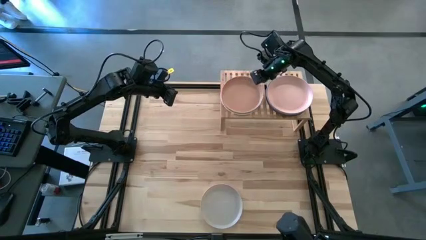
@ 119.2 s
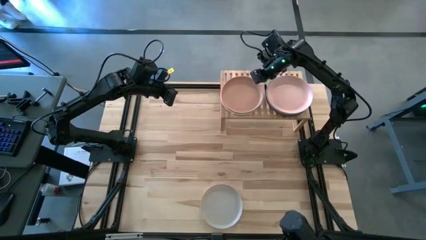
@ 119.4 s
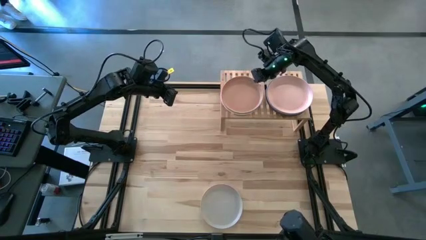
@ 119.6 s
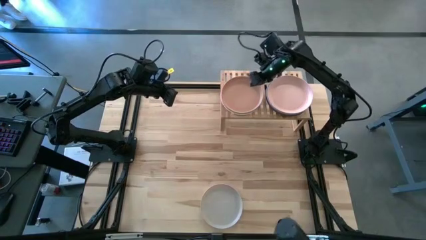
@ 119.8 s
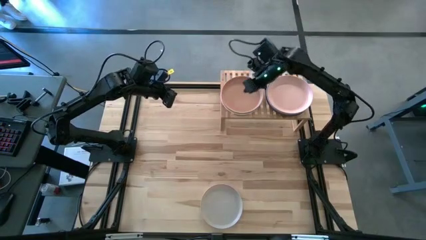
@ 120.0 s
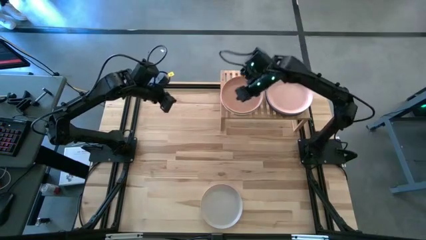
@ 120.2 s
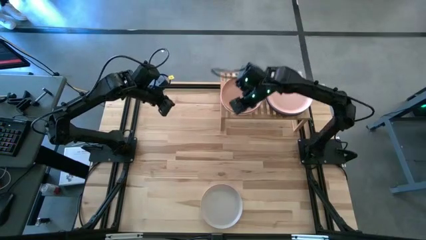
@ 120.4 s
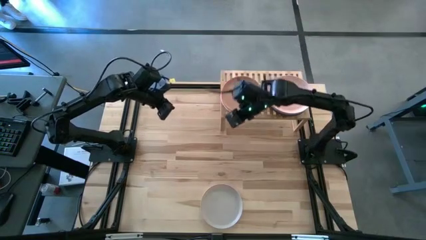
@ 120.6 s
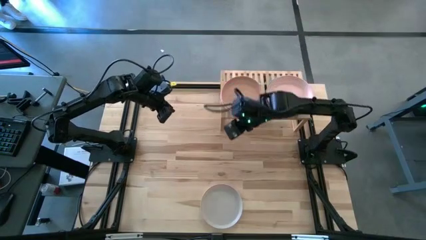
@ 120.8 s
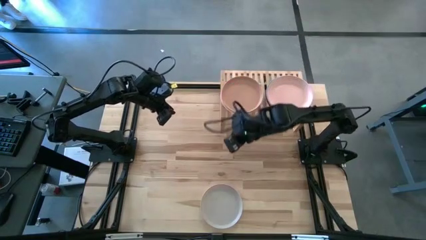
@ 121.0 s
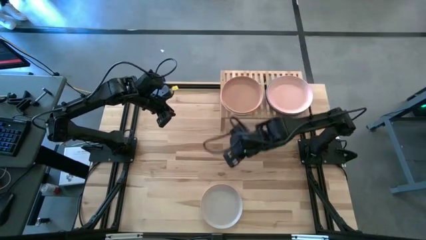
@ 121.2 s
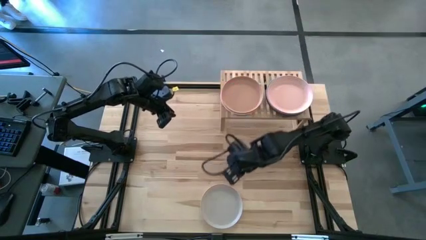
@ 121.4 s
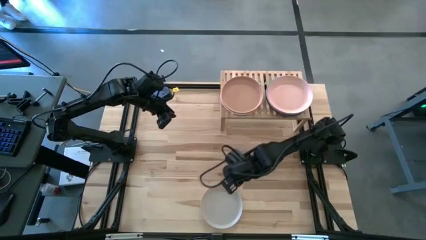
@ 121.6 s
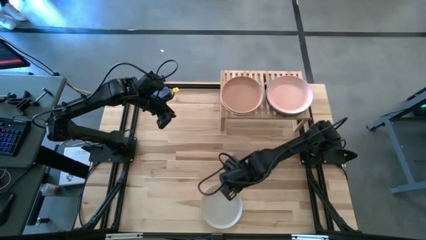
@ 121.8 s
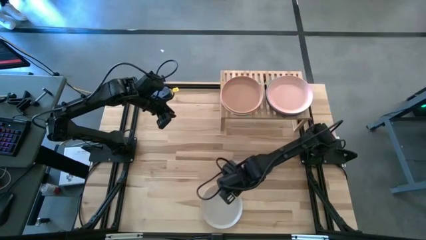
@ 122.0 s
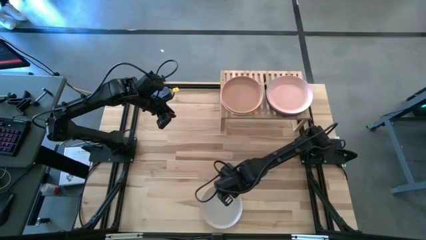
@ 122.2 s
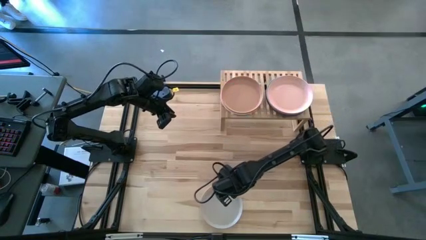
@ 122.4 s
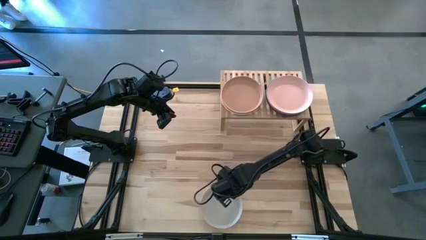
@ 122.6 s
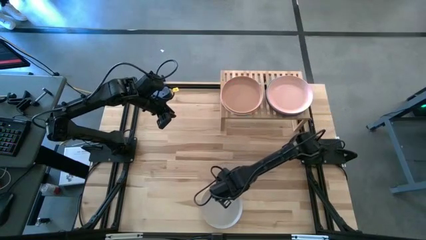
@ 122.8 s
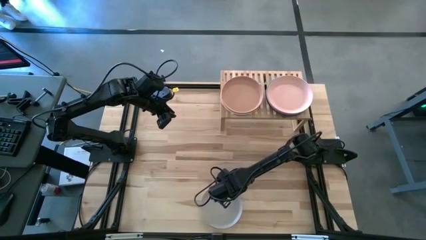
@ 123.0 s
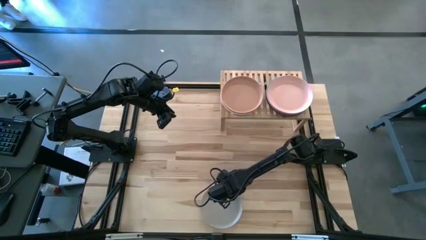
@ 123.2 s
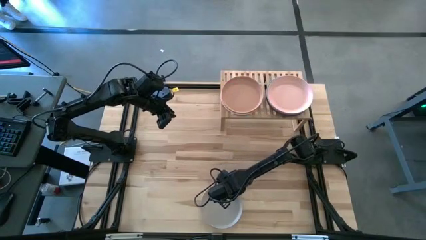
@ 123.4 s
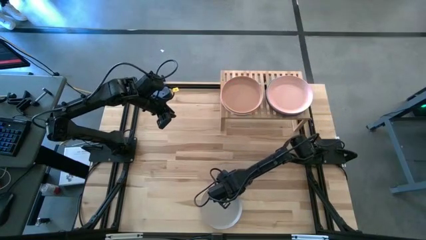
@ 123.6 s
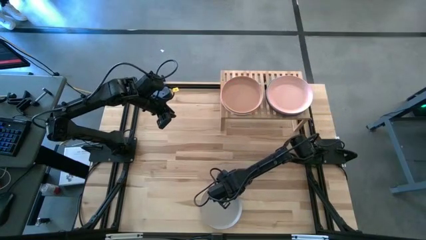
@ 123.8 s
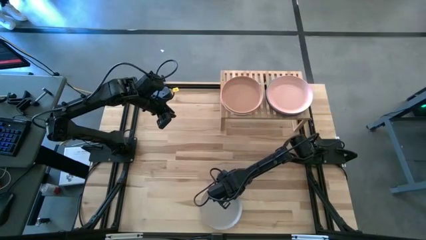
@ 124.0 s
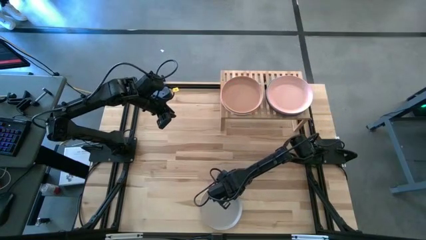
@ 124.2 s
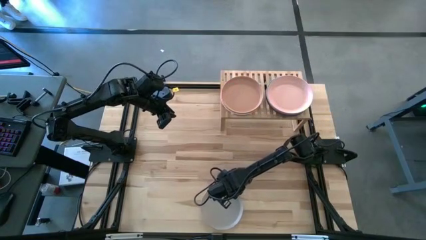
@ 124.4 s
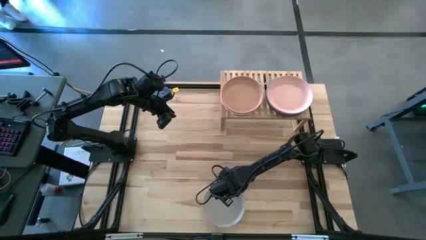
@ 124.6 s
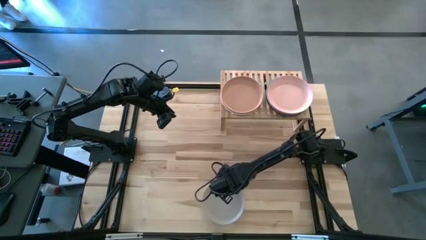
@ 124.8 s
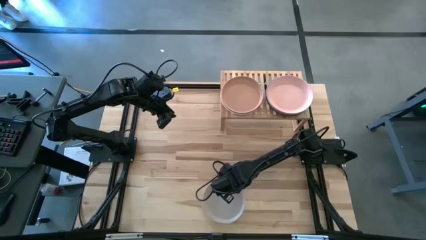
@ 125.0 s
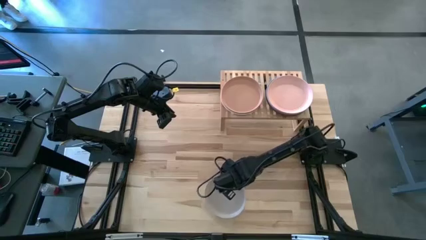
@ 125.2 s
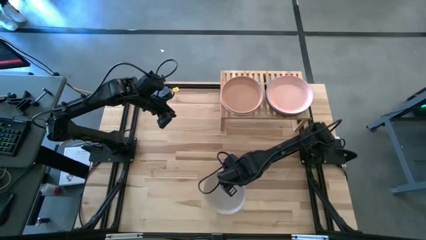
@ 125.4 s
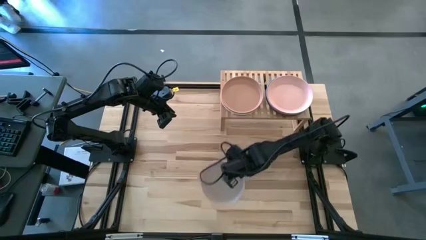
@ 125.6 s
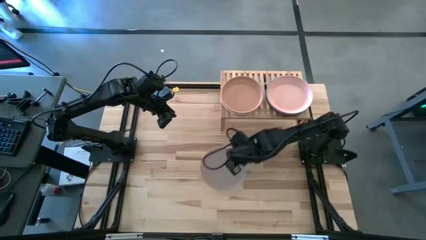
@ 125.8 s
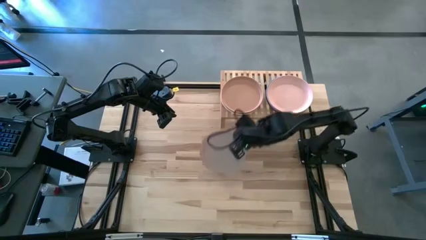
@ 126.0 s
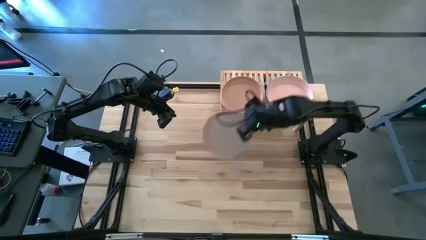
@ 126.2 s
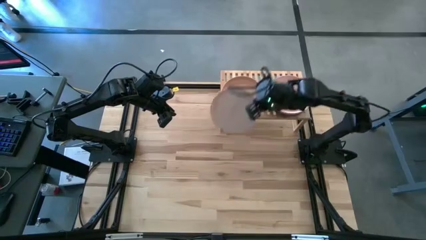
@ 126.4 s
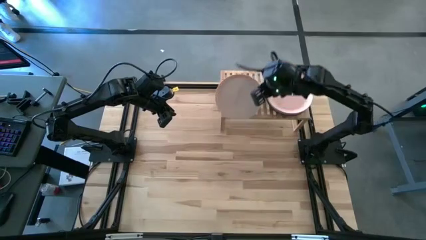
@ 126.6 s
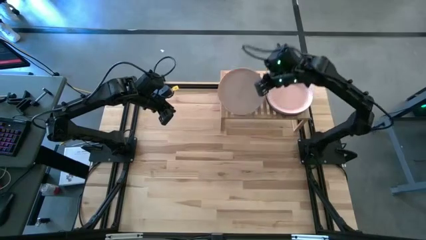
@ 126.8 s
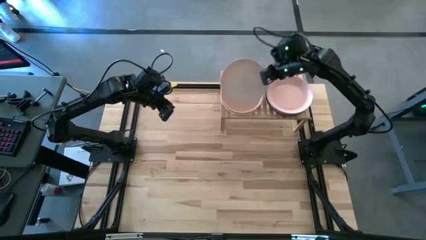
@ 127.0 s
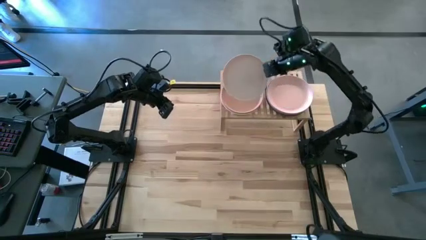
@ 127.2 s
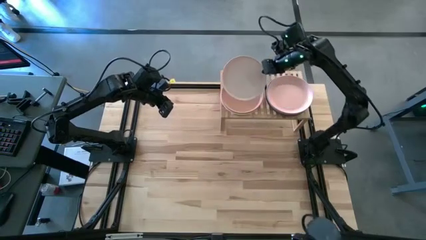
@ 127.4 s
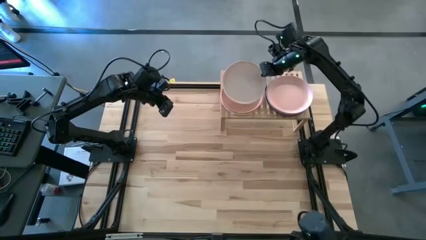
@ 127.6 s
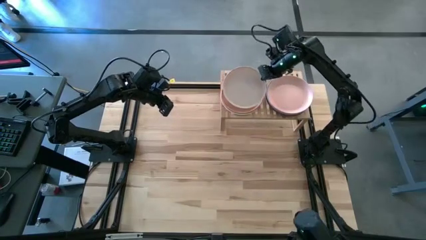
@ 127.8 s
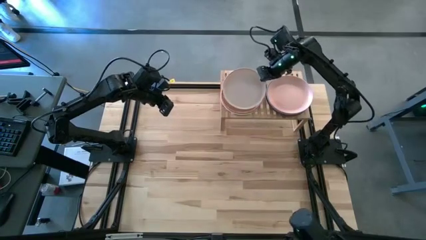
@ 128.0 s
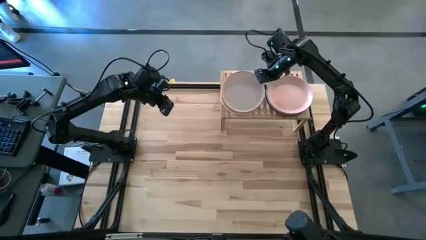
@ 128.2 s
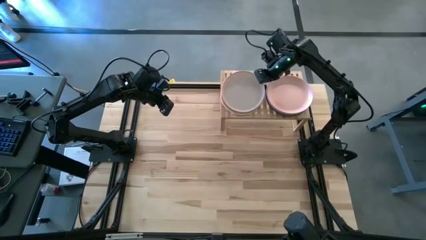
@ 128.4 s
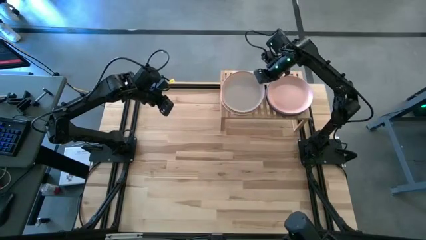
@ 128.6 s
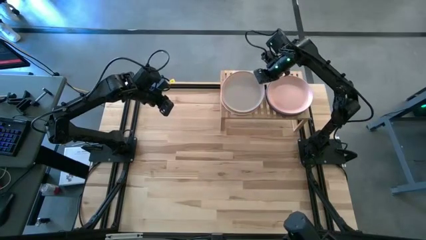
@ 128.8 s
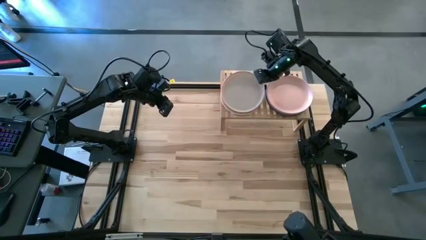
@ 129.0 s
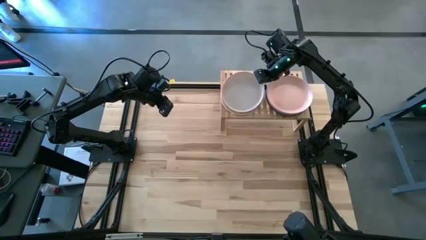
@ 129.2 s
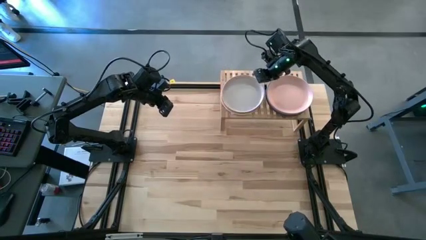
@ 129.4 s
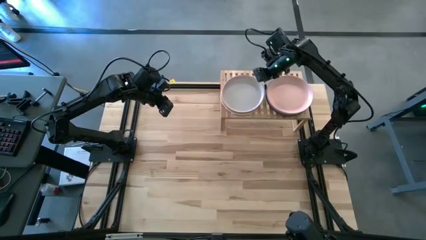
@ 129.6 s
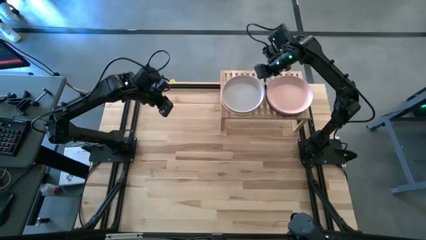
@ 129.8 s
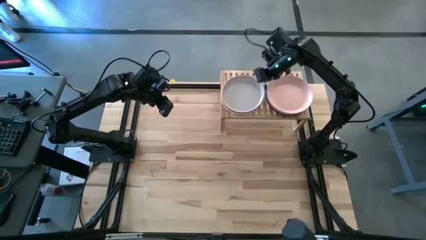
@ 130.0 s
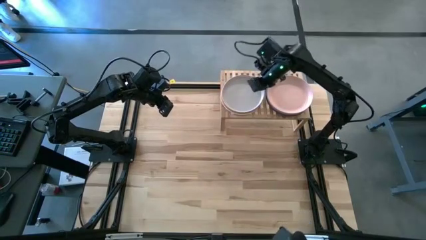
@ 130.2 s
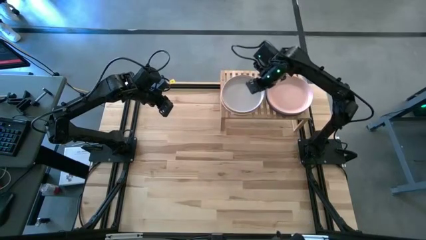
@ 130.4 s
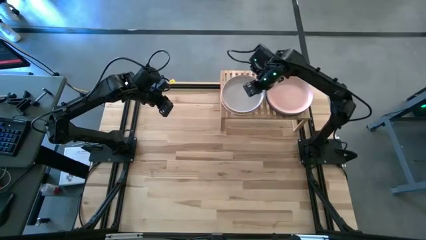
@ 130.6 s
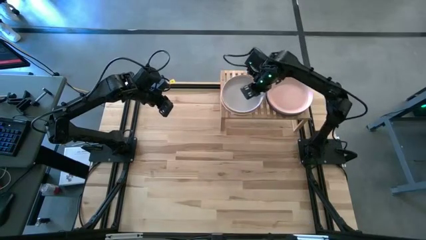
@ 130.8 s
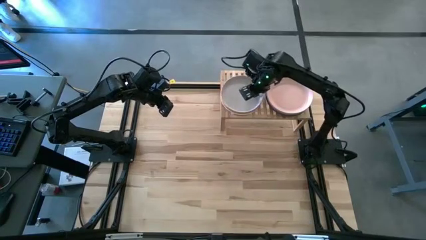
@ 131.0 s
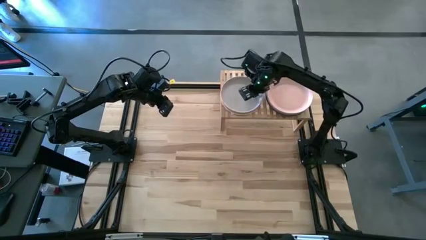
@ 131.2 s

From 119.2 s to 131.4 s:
Task: Place and stack plates onto a shelf
Stack the gray plate on top of the brown plate on the shelf
